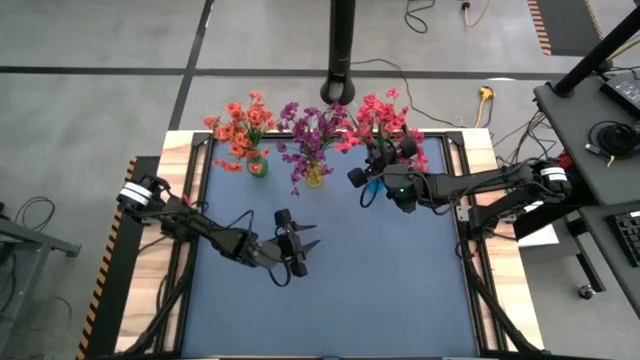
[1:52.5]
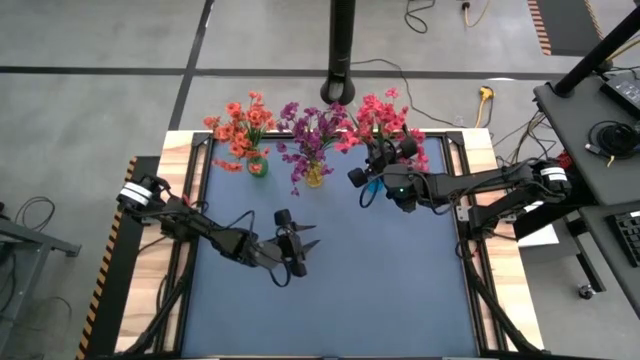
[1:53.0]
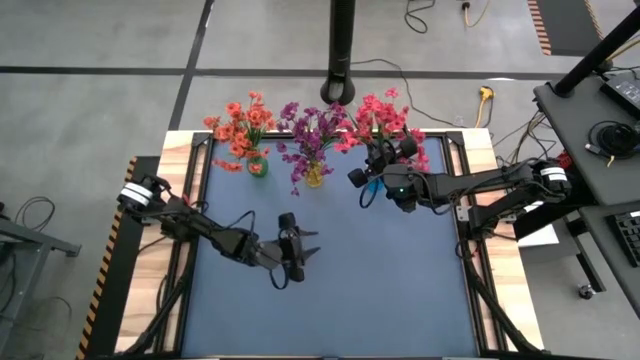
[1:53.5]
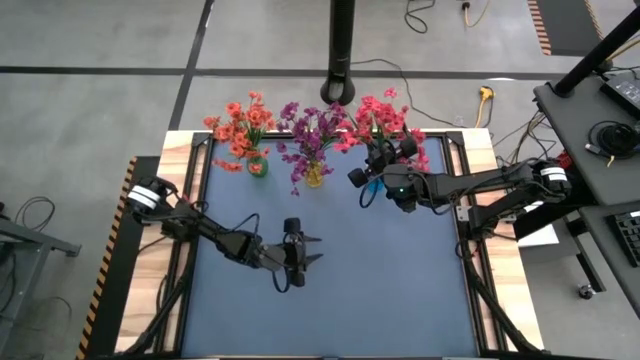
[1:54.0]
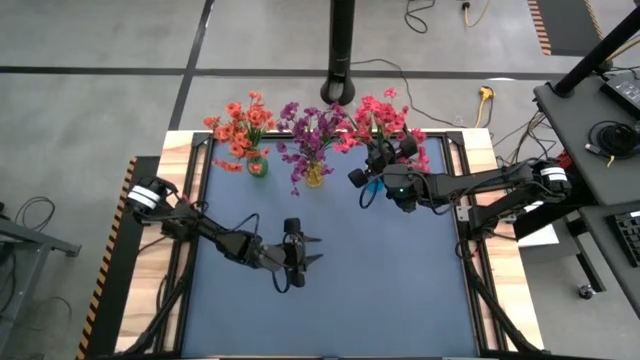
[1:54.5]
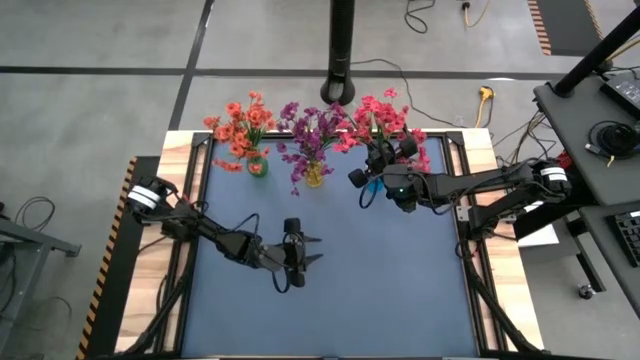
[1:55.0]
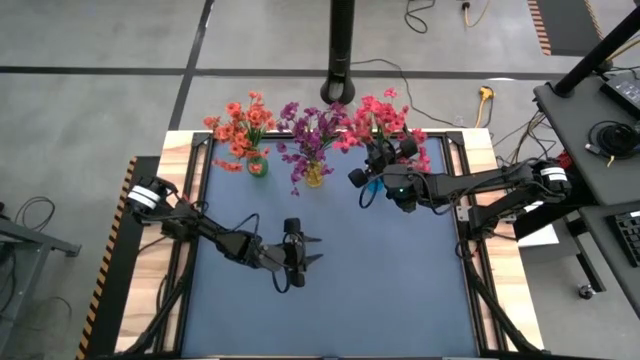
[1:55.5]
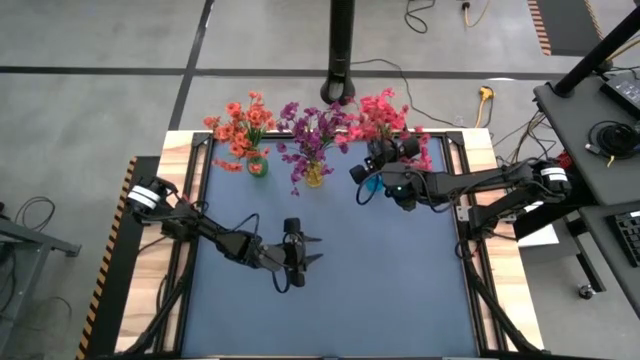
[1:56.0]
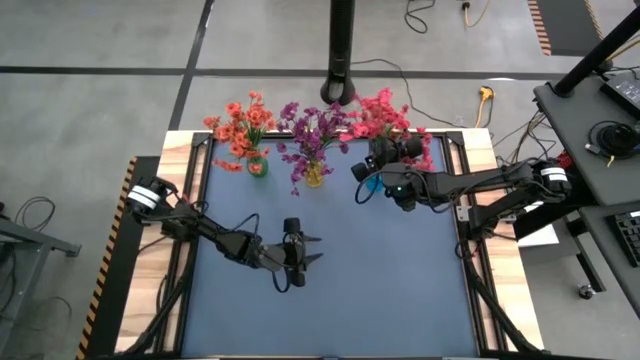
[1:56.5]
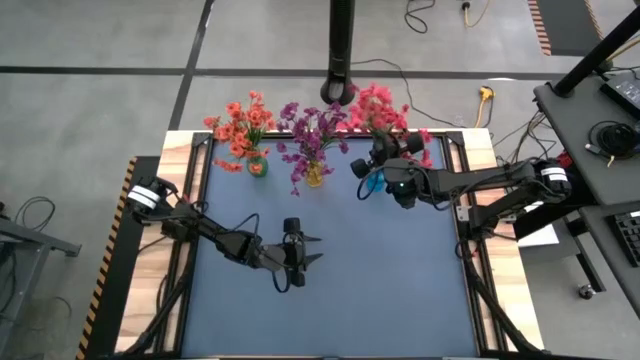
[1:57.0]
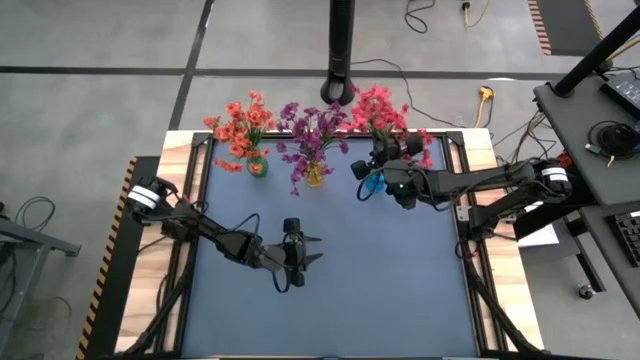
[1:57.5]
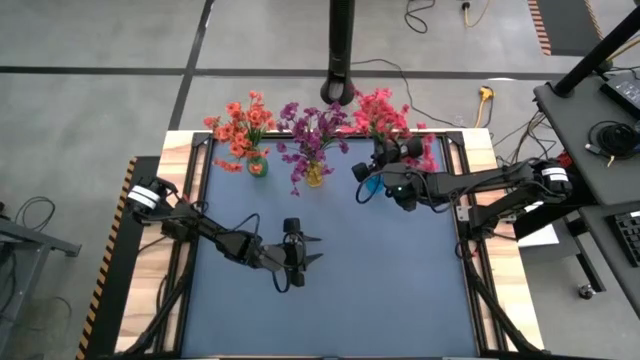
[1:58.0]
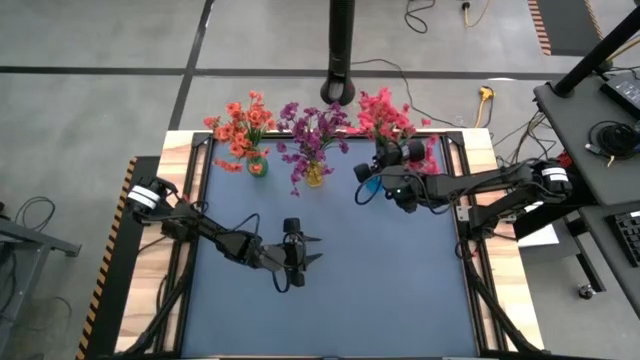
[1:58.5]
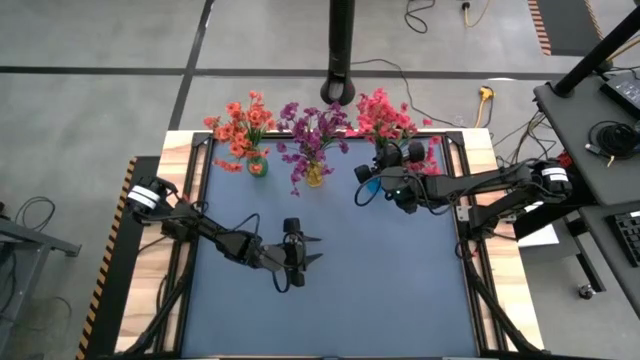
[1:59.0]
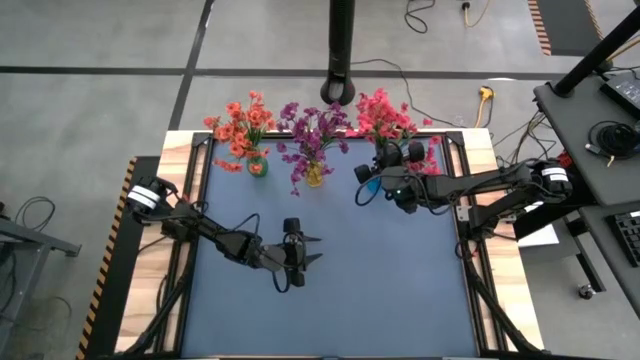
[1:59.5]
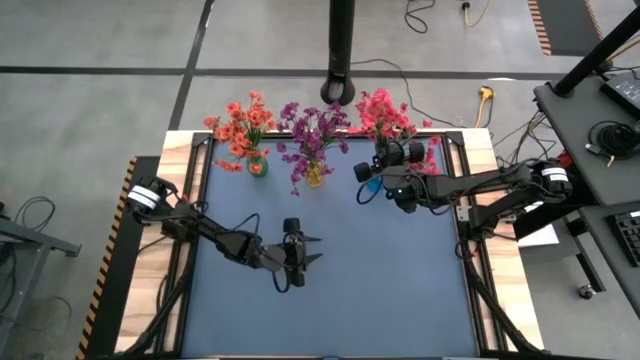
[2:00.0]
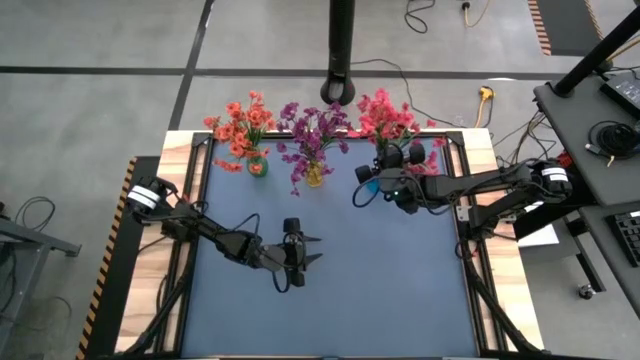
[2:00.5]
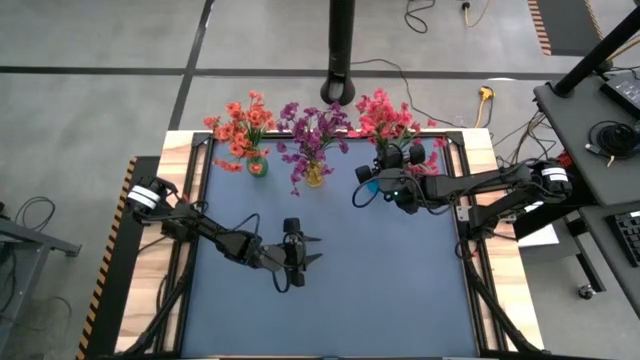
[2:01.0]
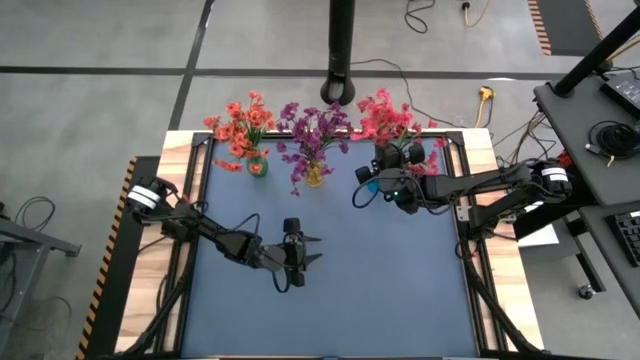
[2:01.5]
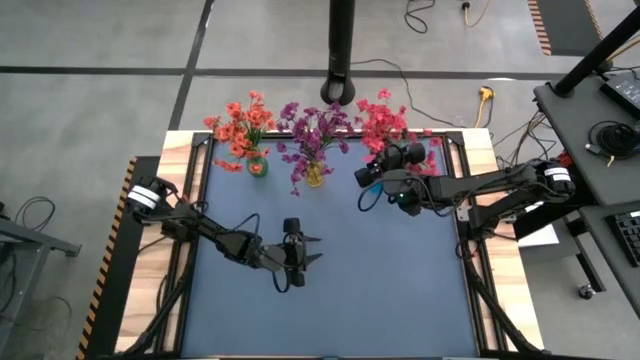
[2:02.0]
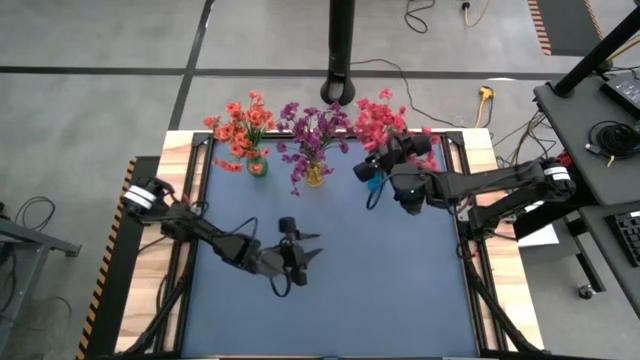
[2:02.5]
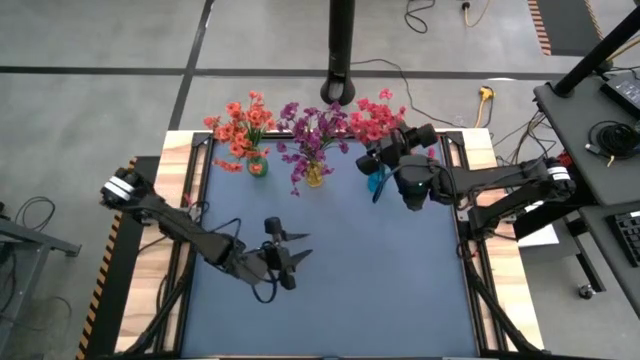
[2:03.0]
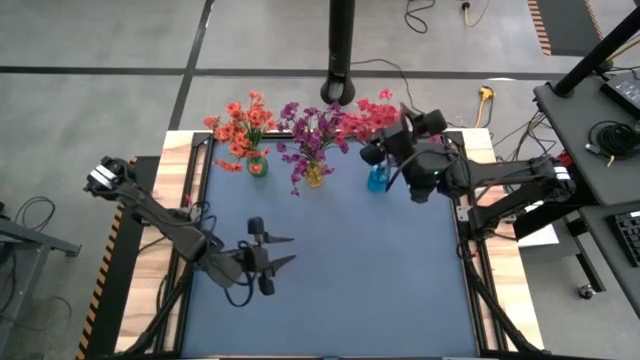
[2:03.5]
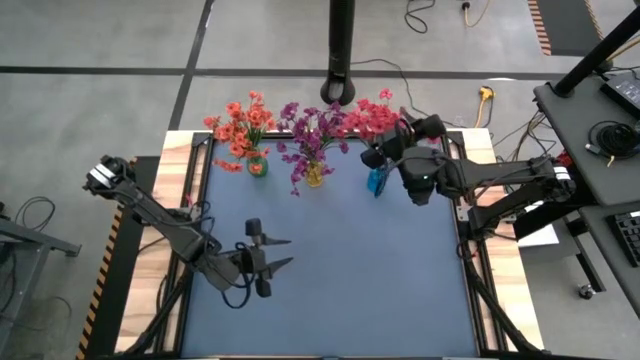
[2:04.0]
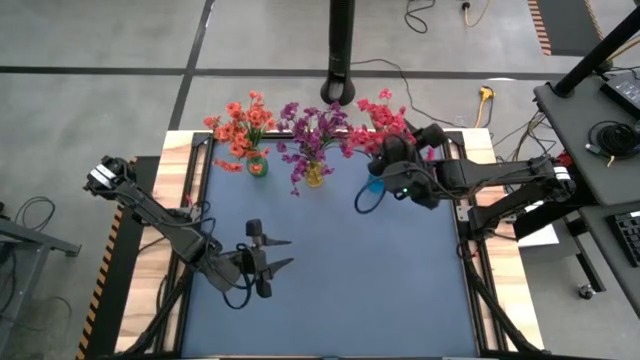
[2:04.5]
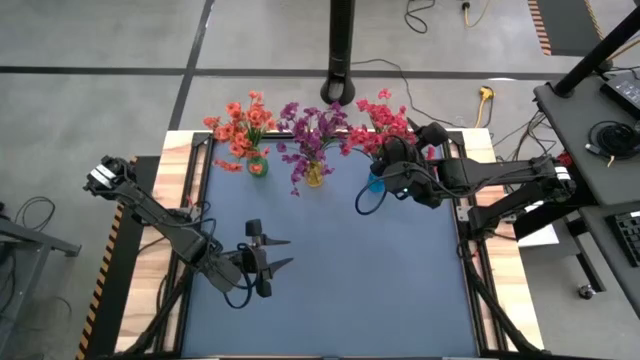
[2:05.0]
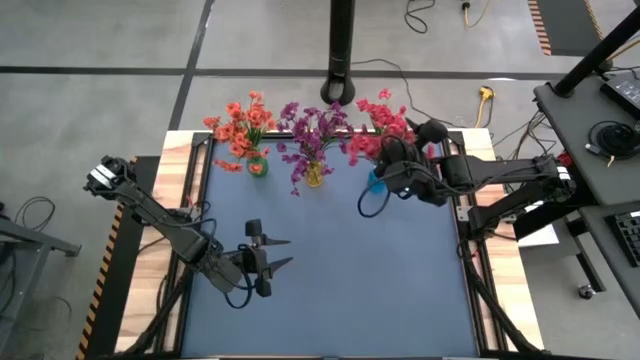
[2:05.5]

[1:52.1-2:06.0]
Task: Sort flowers into vase by color
Put the pink flowers into the blue vase

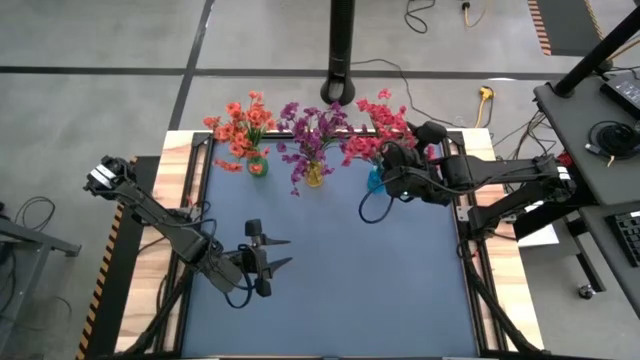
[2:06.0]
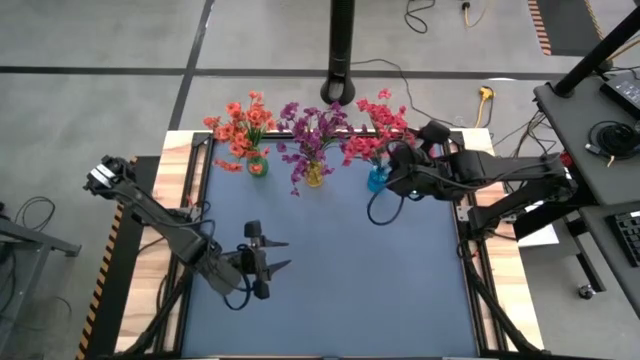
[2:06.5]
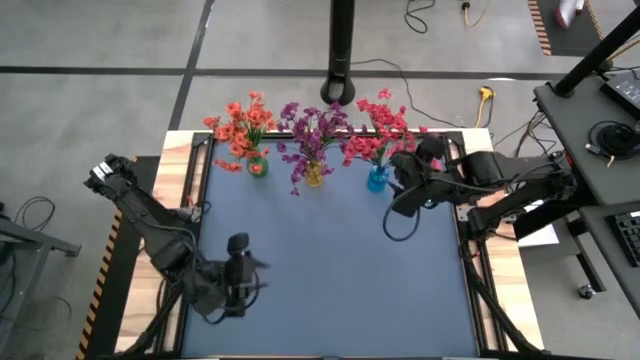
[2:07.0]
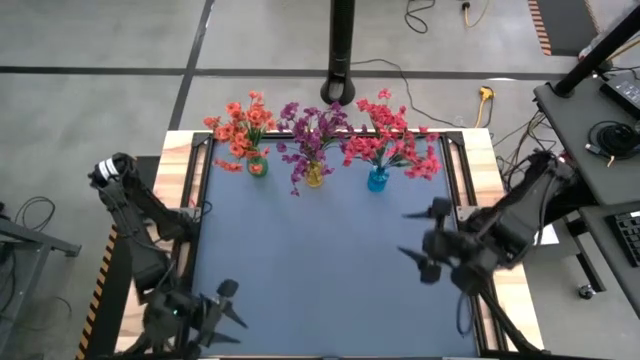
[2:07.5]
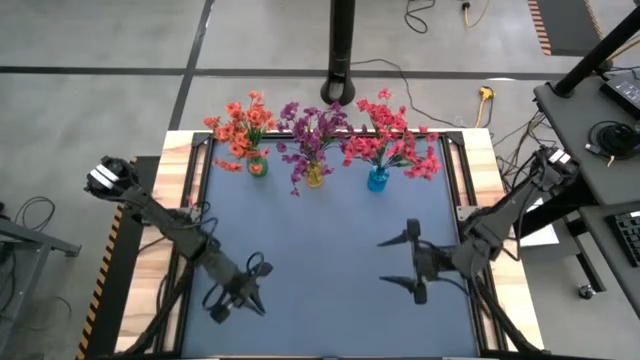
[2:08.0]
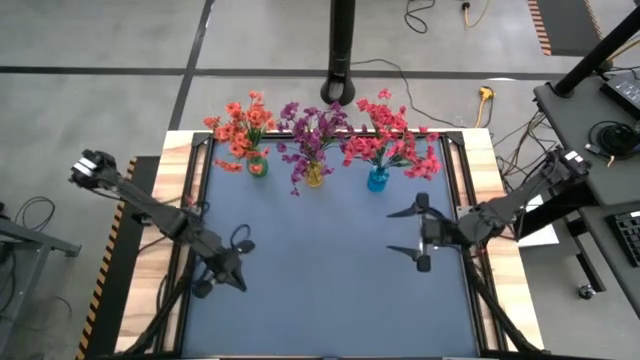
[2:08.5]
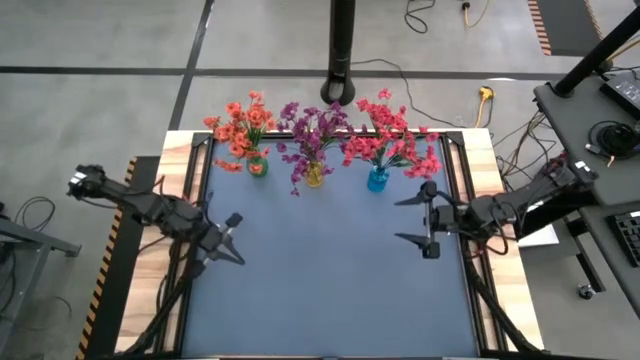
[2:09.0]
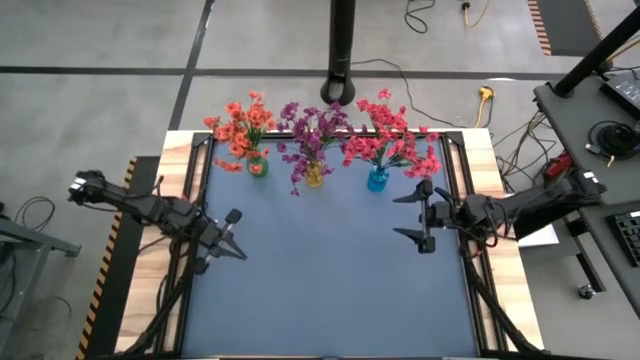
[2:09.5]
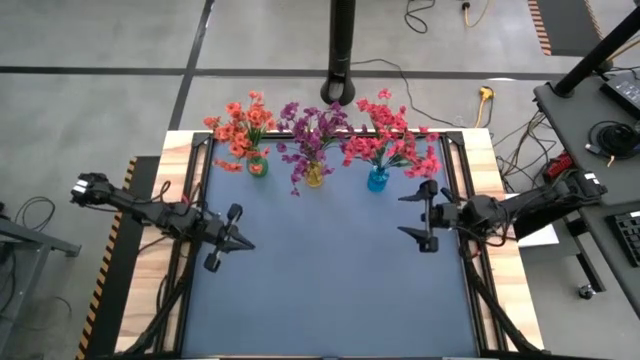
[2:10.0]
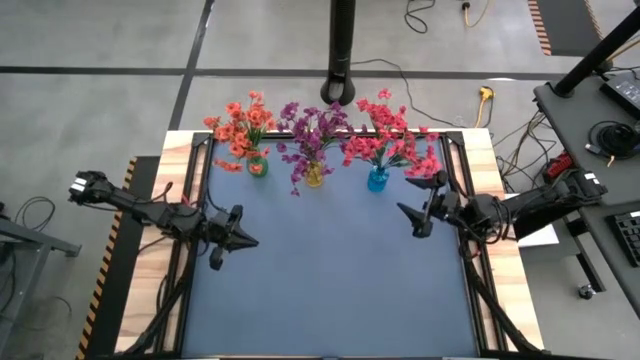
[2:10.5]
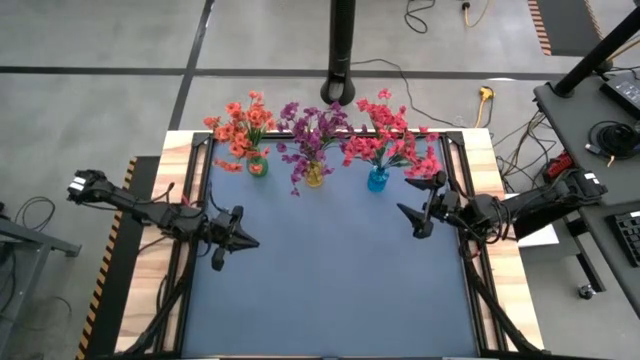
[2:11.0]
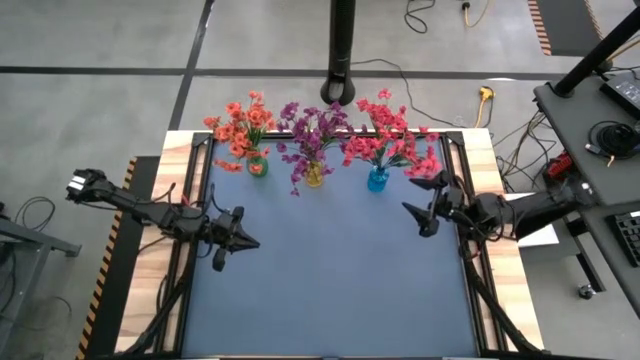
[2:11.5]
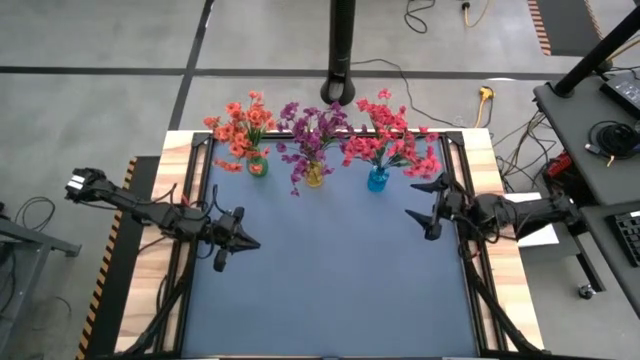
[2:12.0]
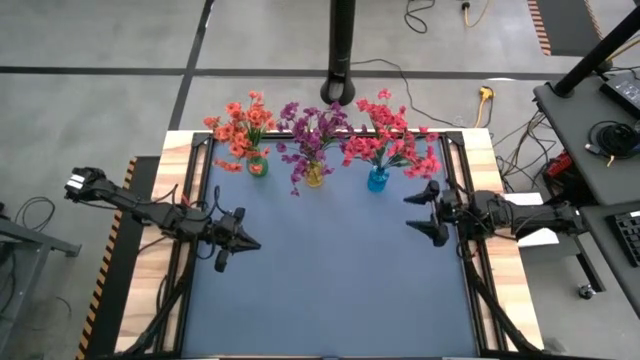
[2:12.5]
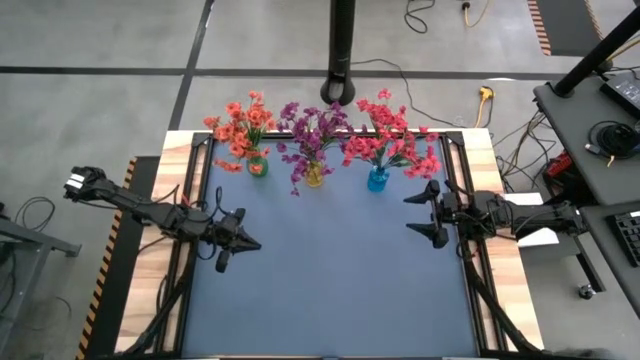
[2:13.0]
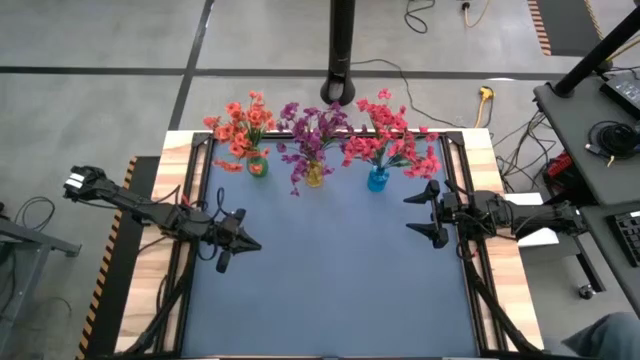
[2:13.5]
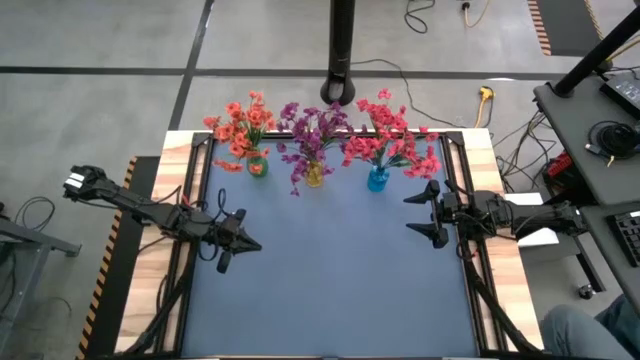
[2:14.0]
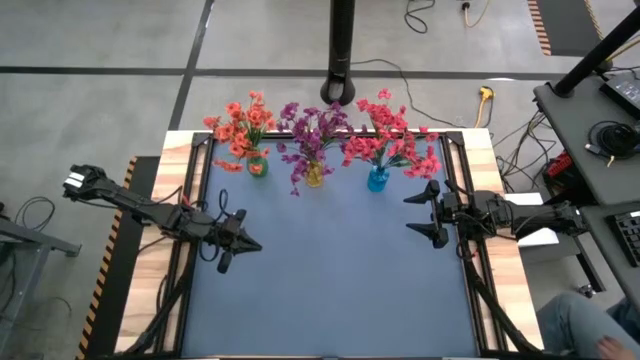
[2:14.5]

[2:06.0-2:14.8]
Return to Home Position
